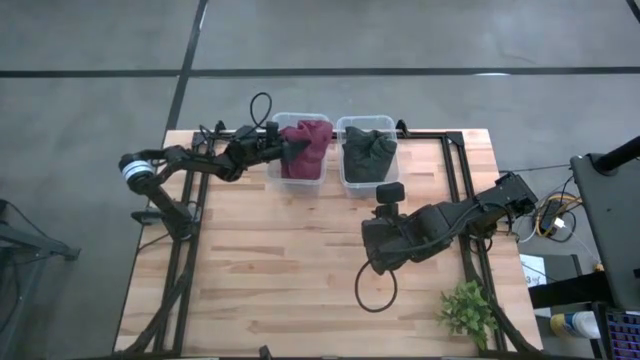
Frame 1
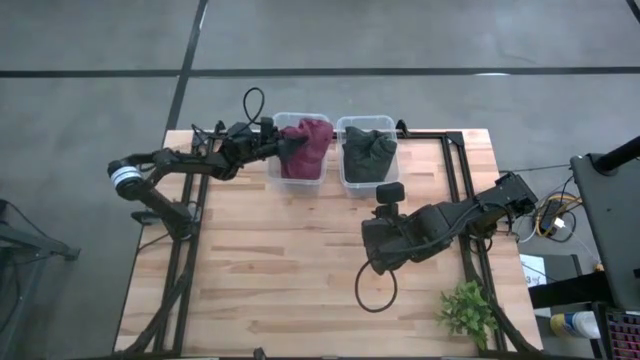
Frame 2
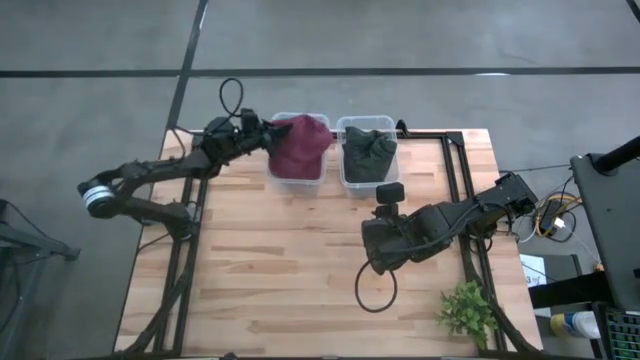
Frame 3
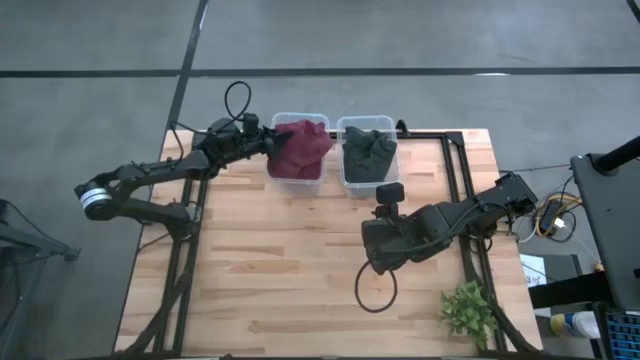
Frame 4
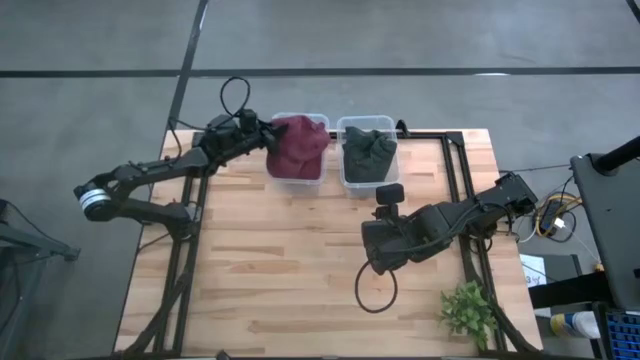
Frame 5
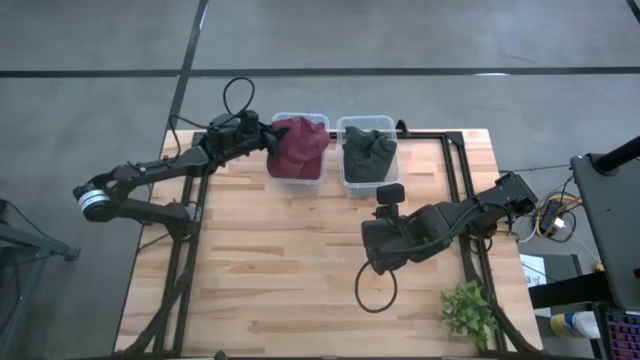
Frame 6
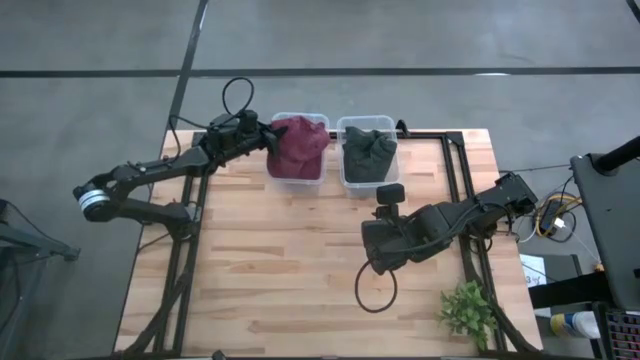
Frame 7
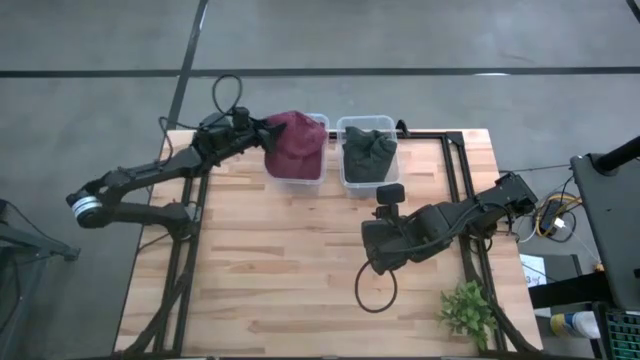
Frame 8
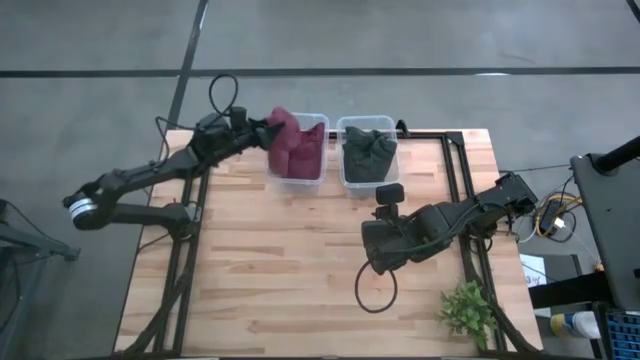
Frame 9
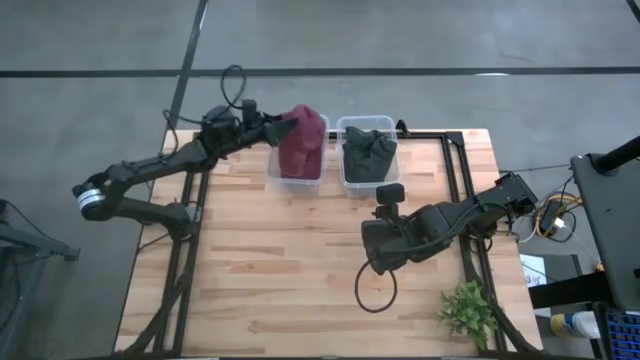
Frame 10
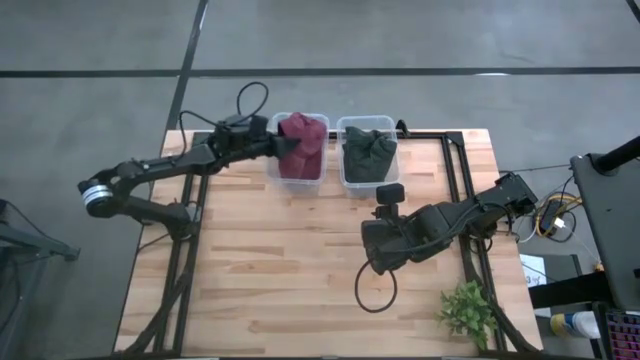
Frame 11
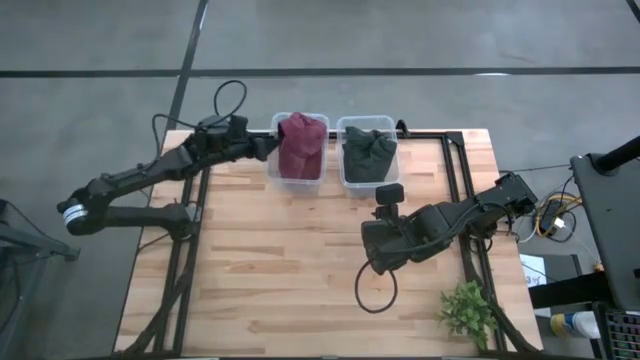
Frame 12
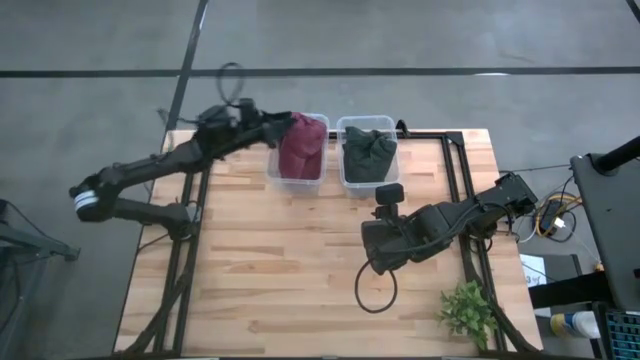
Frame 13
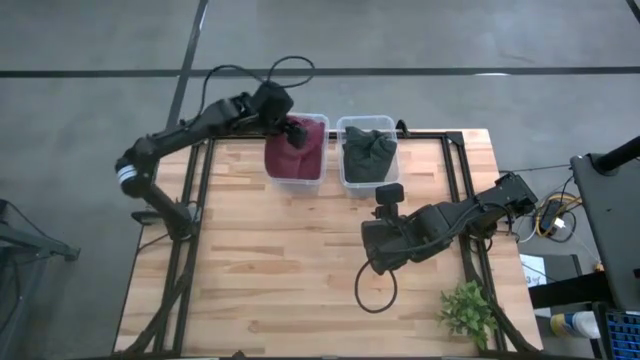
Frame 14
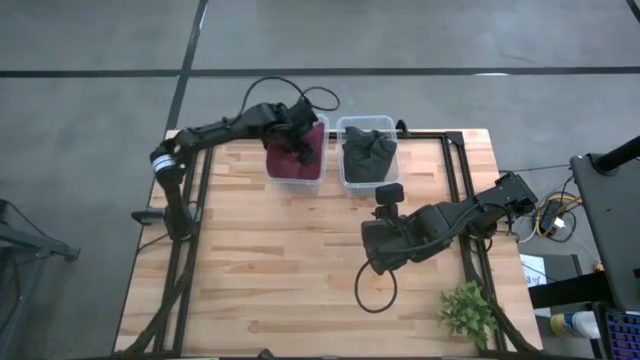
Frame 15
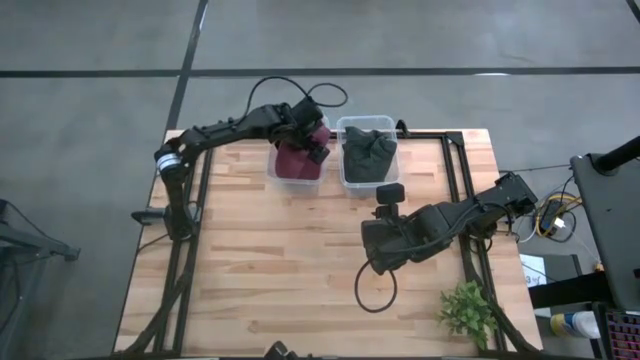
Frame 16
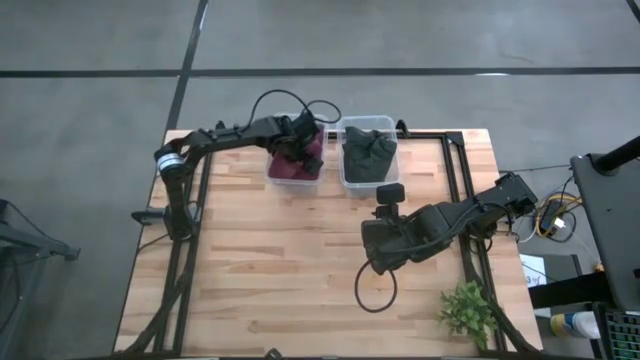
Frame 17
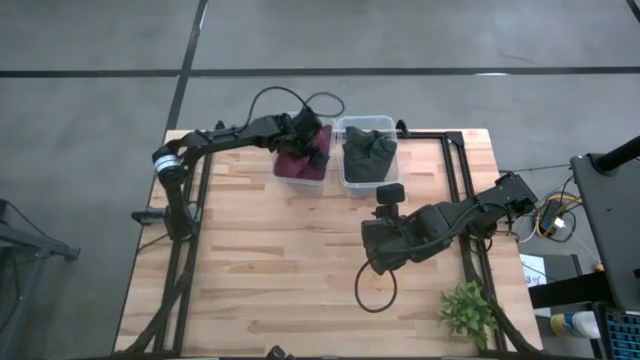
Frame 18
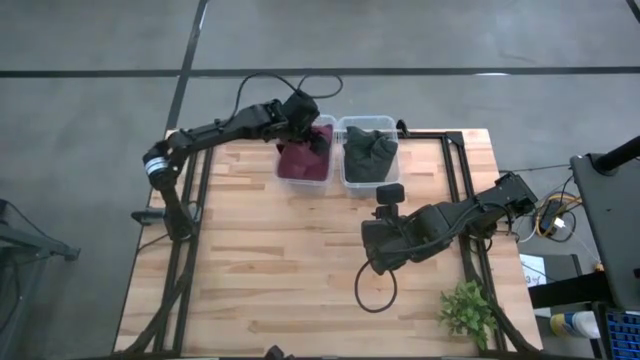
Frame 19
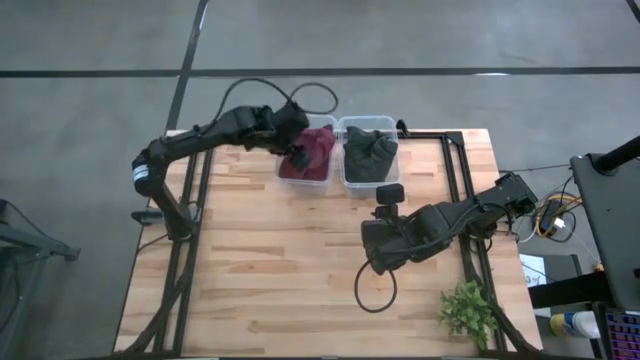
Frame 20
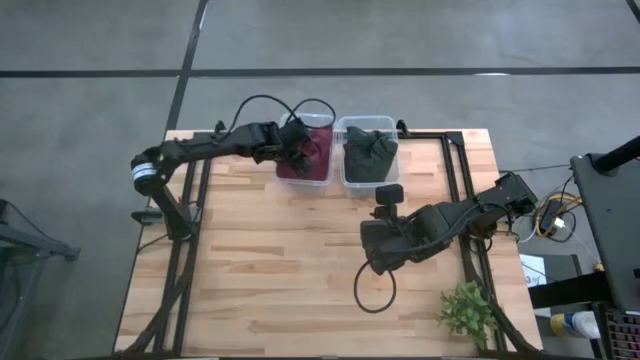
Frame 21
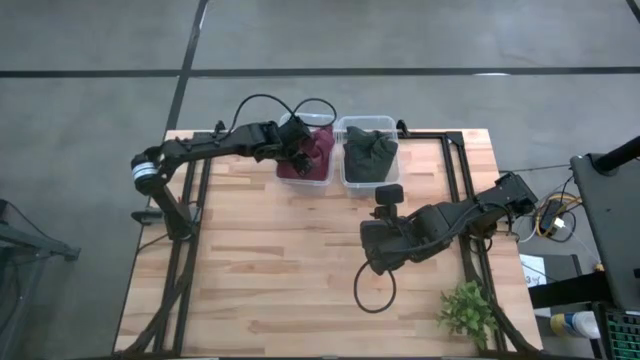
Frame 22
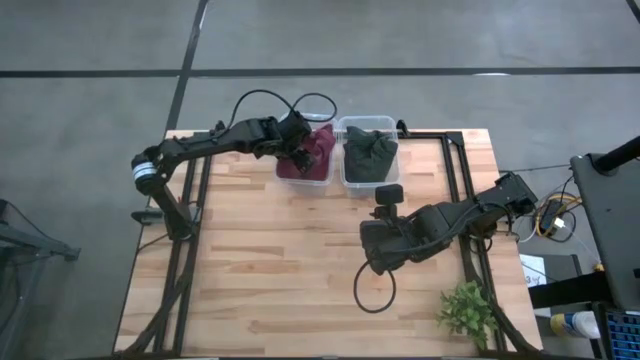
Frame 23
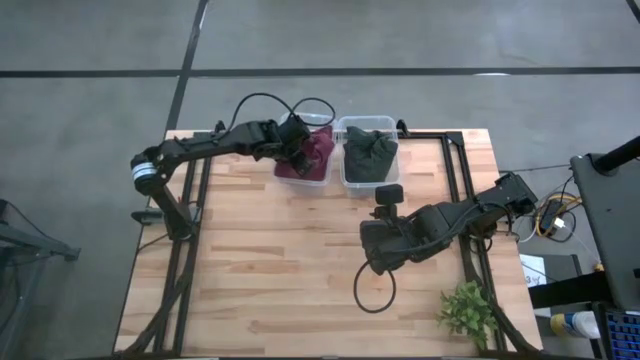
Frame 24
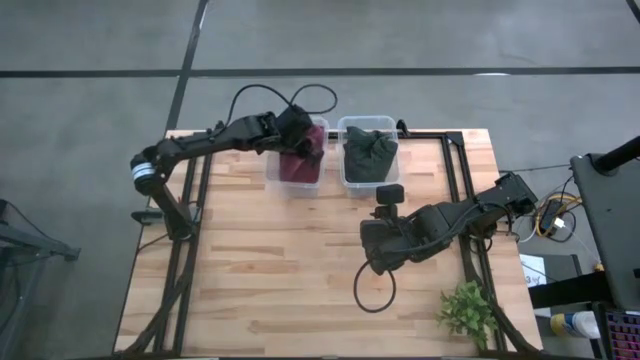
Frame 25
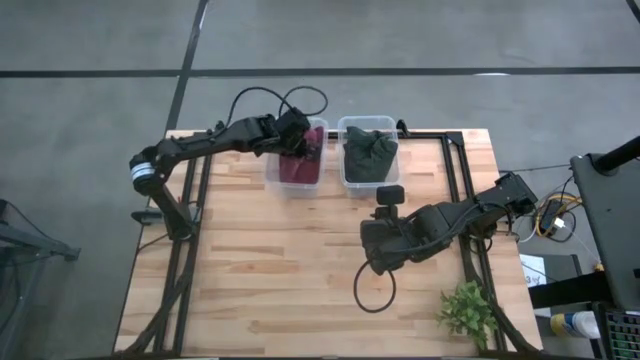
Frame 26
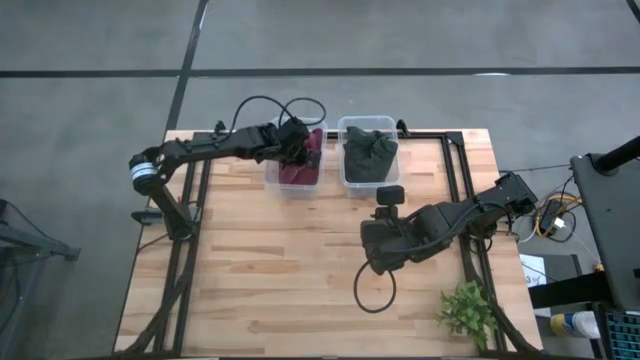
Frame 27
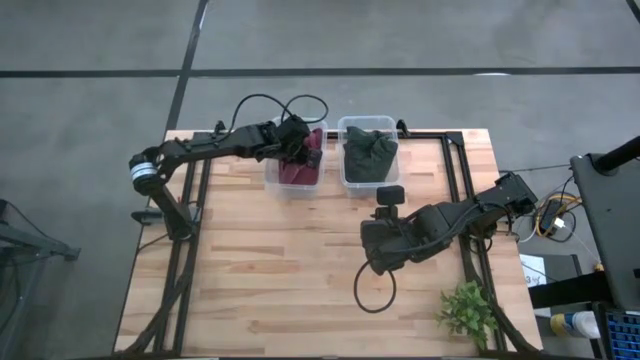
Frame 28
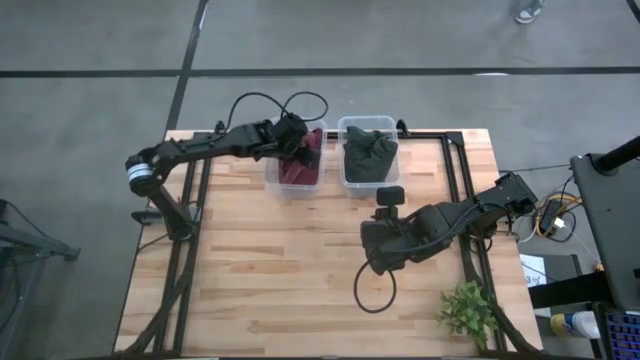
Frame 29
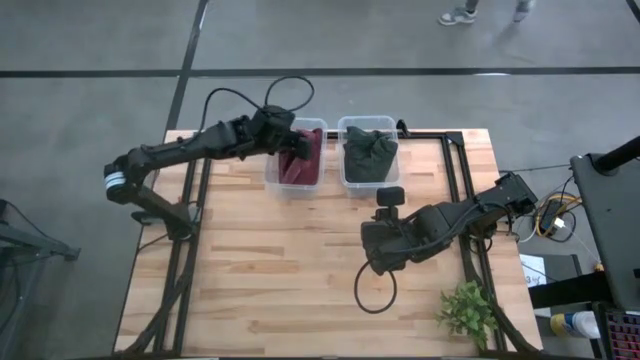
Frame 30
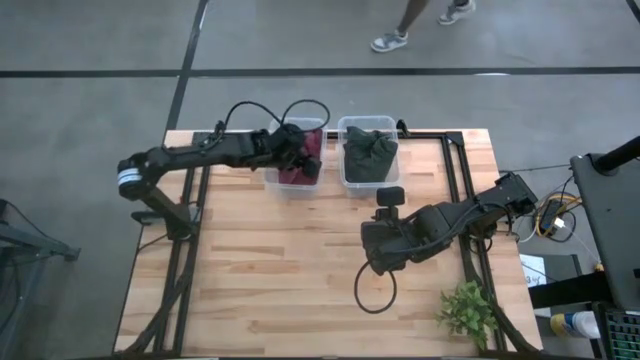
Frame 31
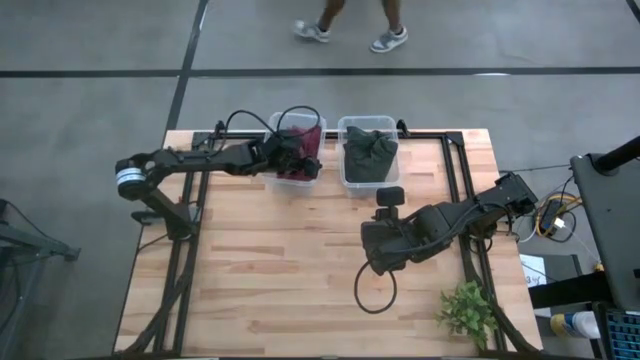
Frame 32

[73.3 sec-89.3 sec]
Task: Pick & Place hat
Put the red cap into the left transparent bin

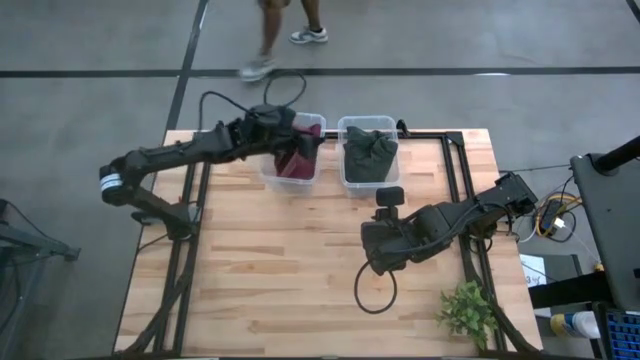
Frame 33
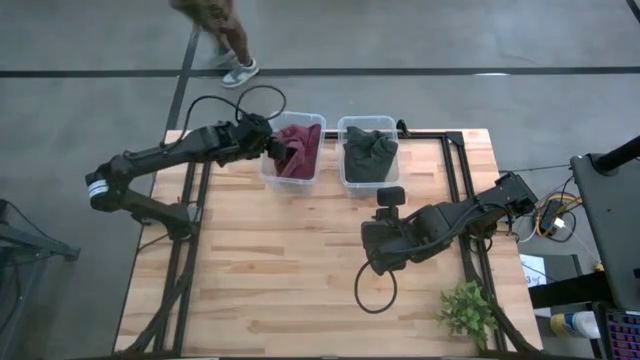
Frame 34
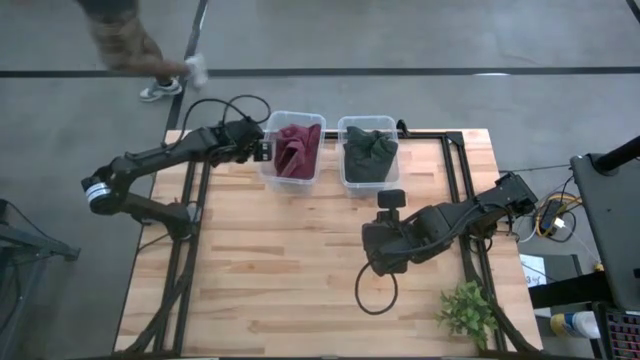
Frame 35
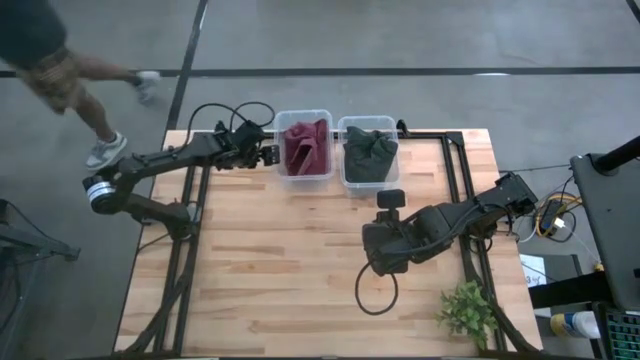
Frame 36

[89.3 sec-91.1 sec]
Adjust the left transparent bin

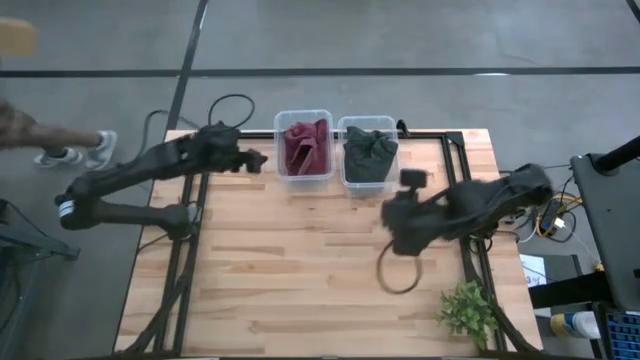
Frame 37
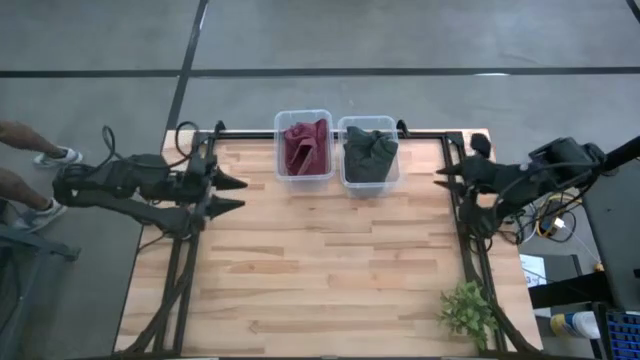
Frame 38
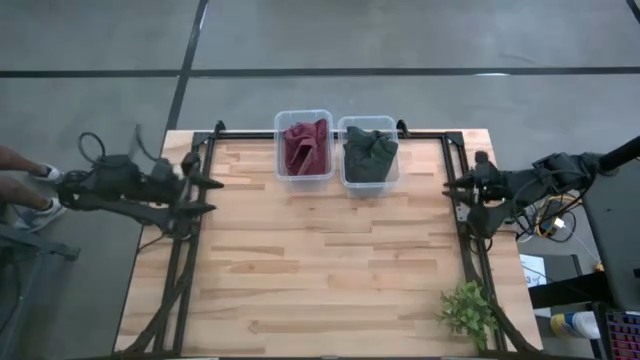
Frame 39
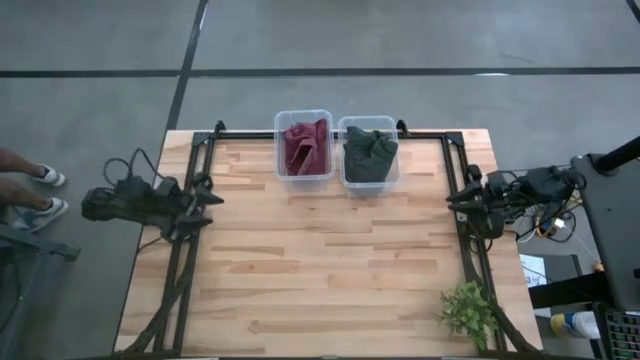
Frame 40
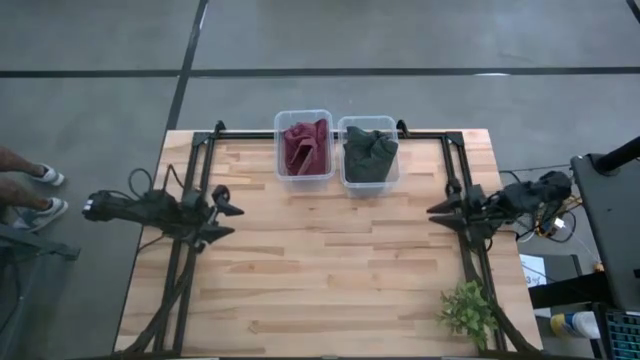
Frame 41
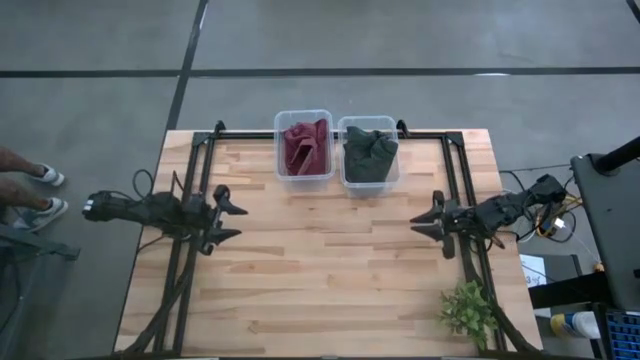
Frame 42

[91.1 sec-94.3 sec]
Return to Home Position

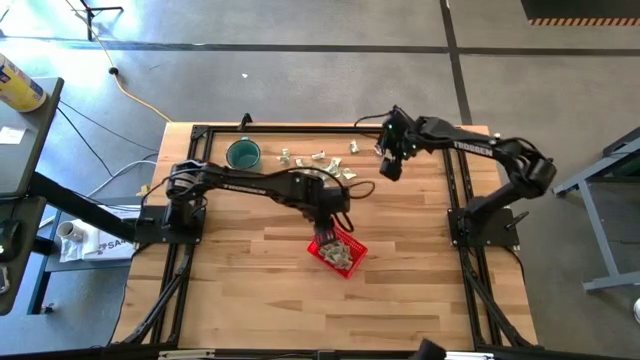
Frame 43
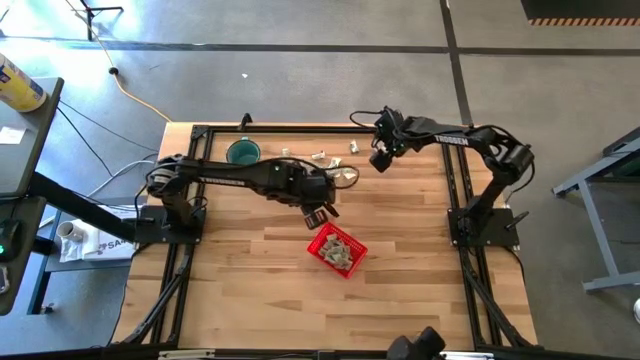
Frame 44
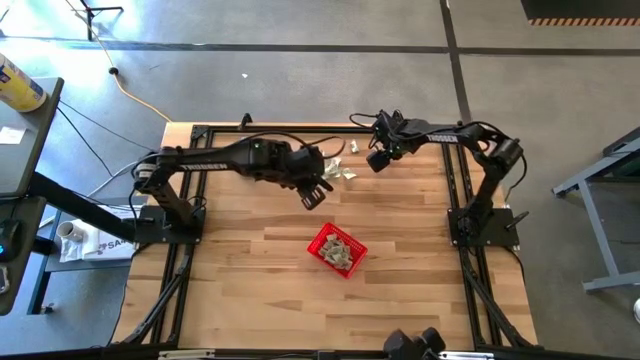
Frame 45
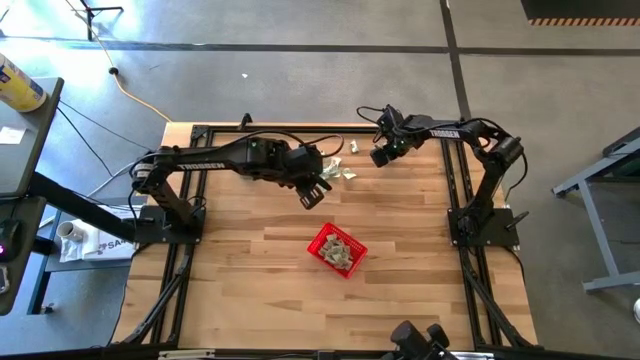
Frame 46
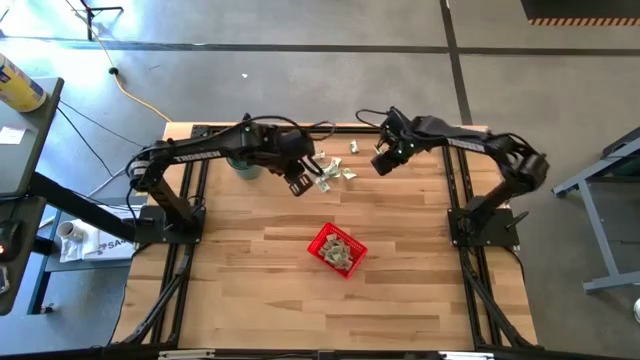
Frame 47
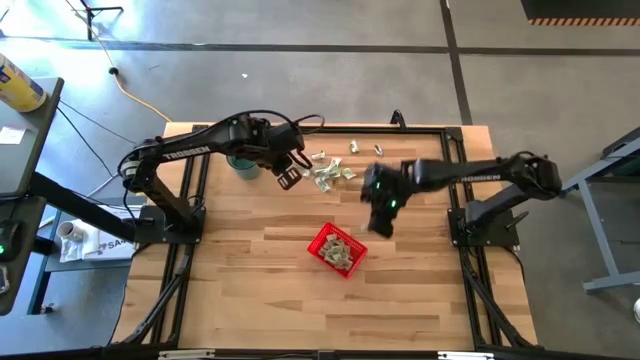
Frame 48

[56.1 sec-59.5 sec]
Task: Pick and place Stevia / Truvia into bins
Put the light green stevia packet into the bin
